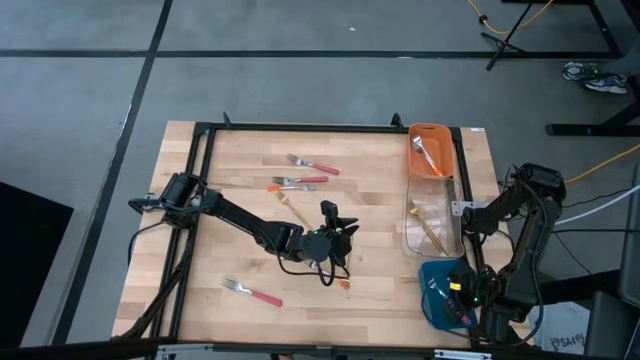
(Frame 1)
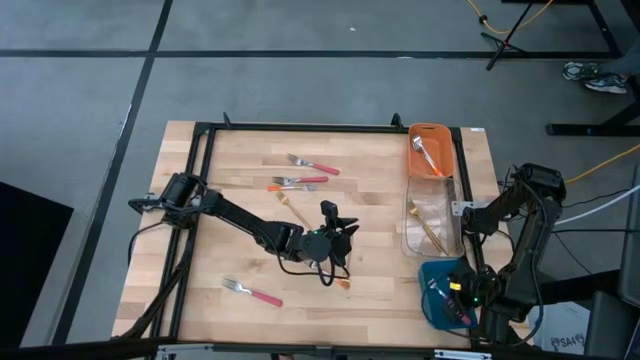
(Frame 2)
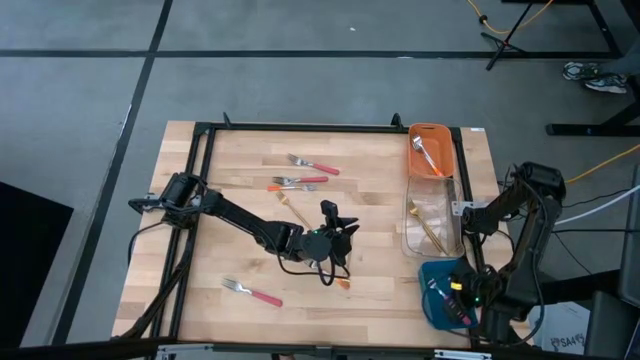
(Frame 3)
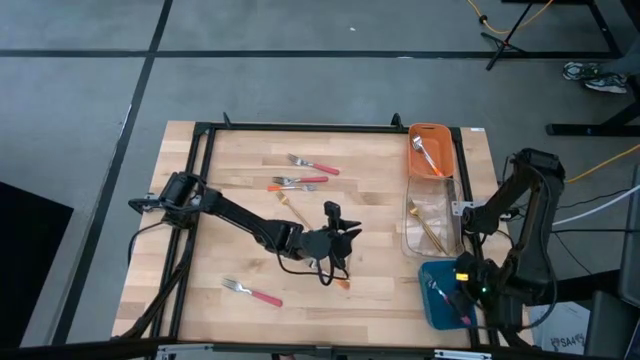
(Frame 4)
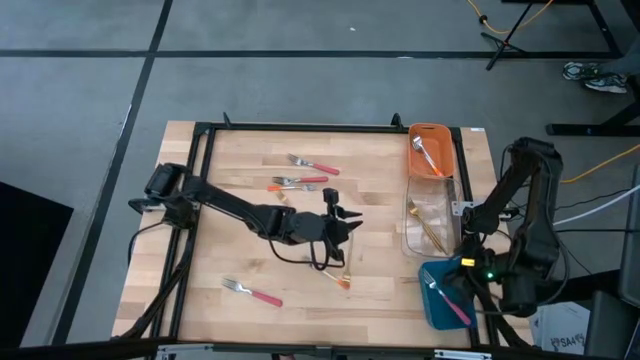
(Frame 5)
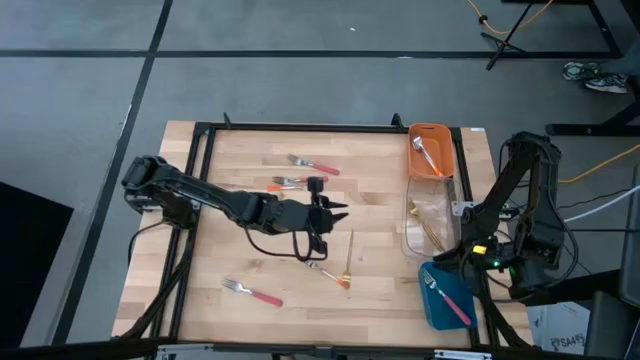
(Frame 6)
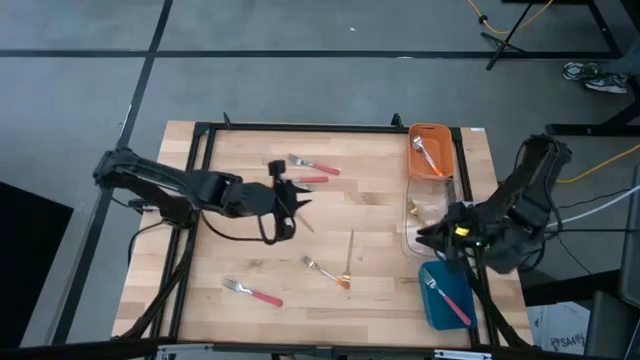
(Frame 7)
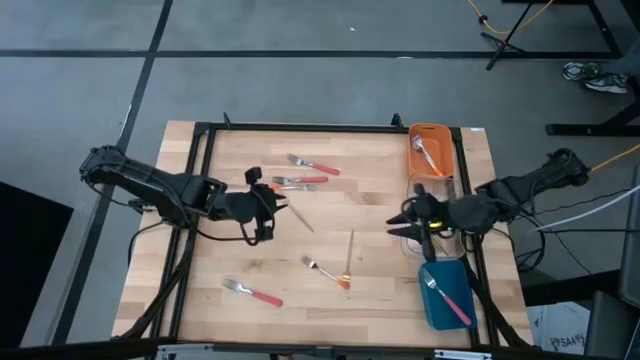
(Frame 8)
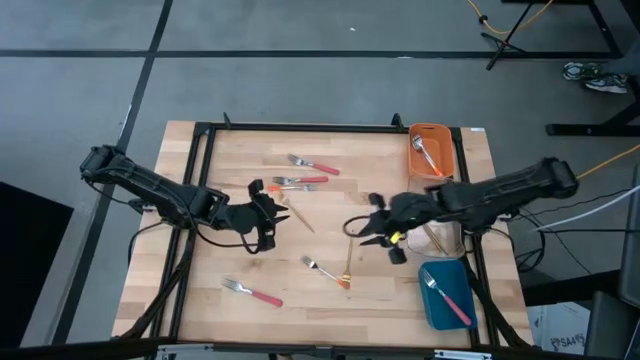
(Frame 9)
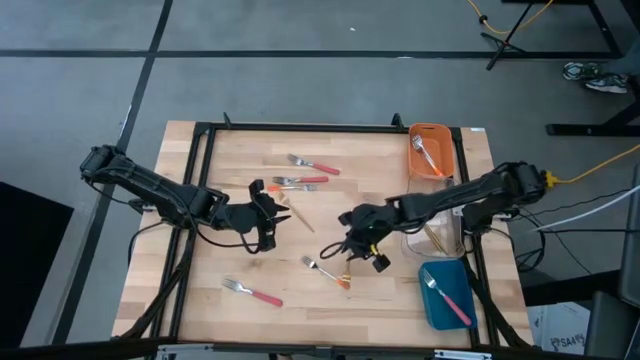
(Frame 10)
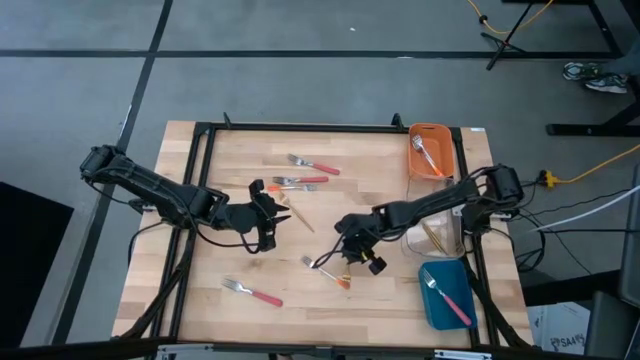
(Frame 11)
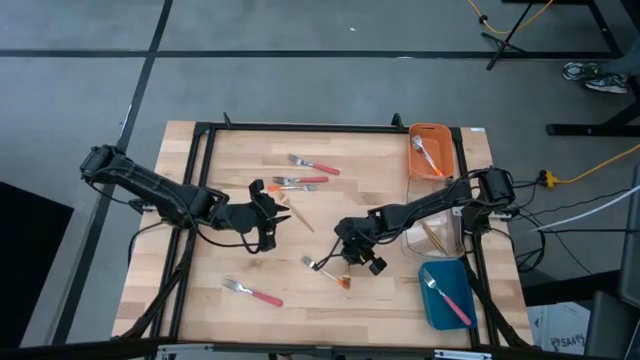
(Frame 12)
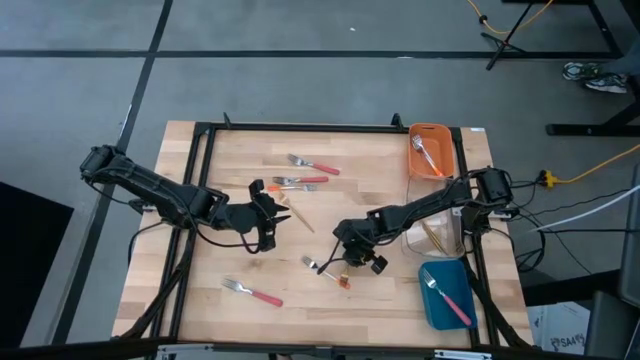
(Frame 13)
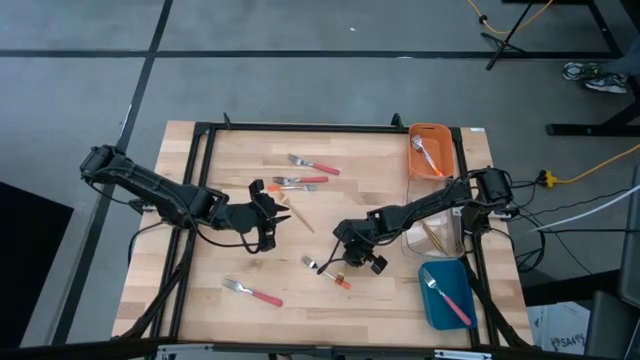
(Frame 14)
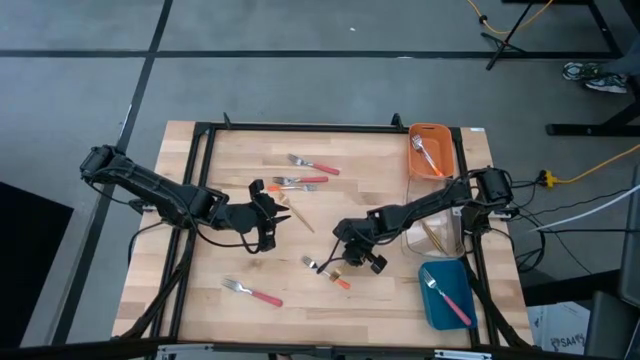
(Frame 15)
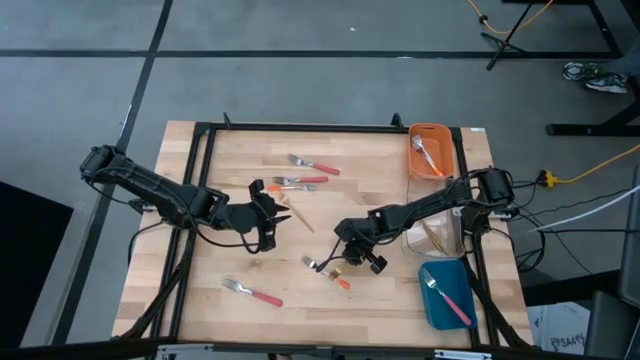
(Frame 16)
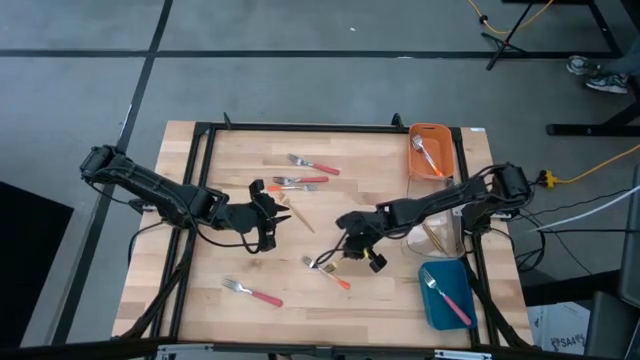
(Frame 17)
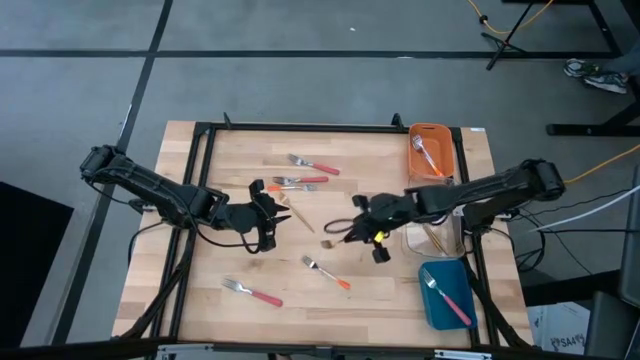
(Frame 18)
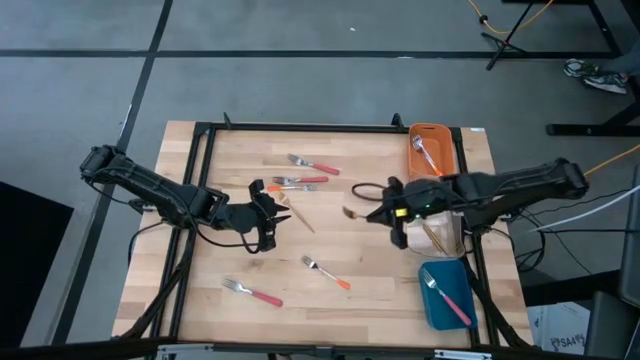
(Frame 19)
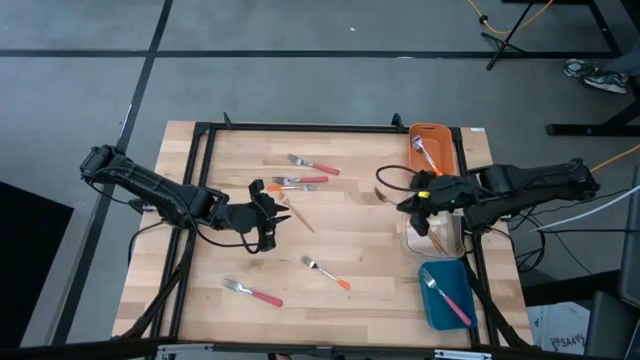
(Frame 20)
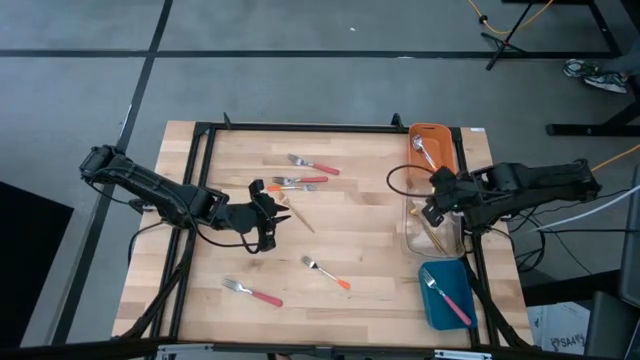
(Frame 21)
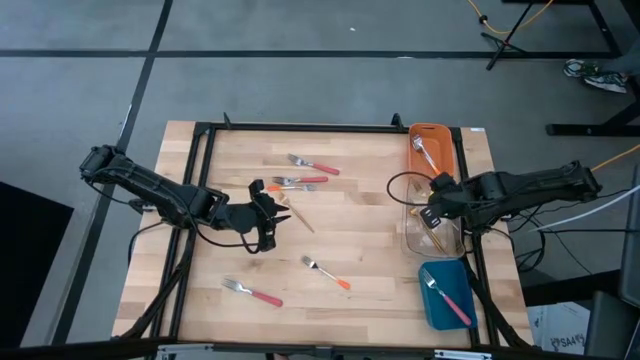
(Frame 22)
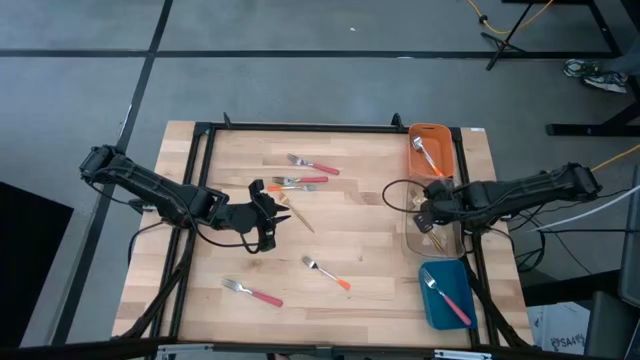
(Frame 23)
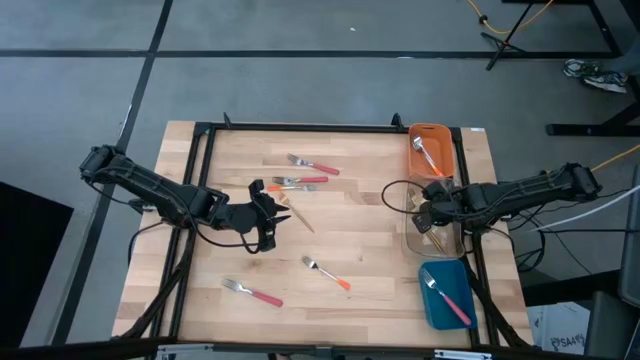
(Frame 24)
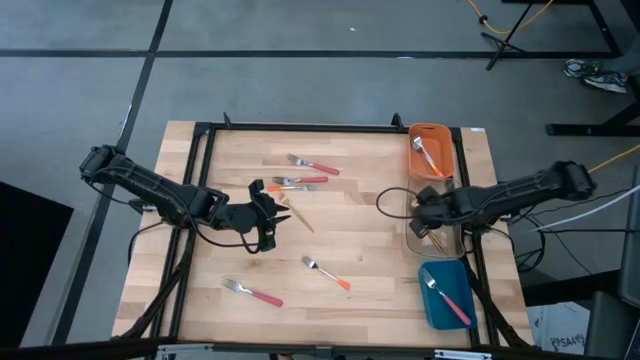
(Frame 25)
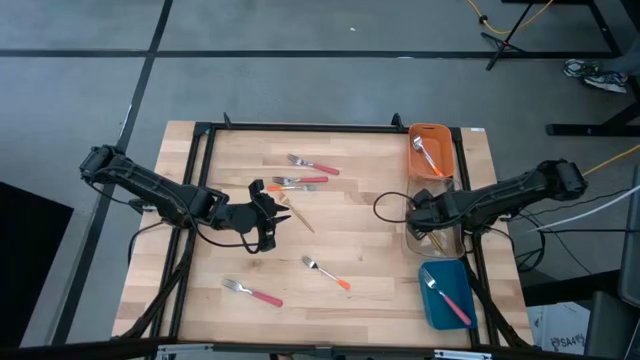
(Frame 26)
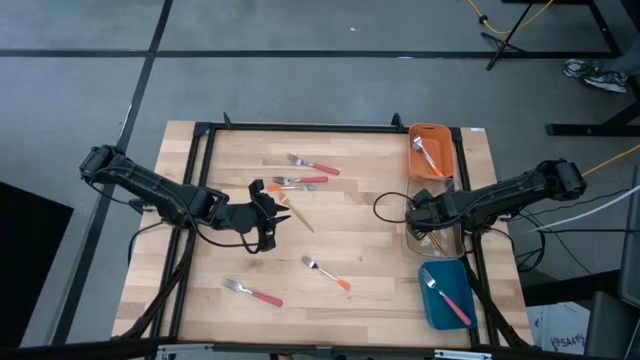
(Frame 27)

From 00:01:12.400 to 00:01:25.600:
Task: Sort silverware by color (type)
Put the gold fork into the transparent bin

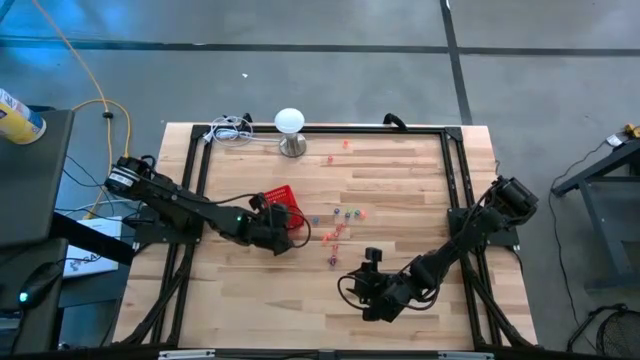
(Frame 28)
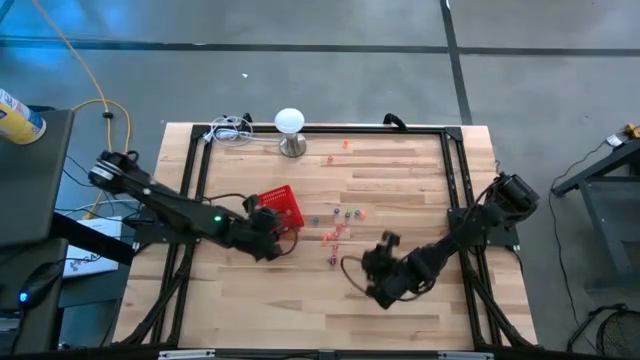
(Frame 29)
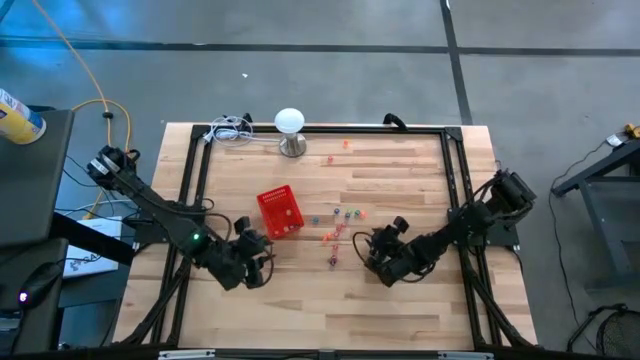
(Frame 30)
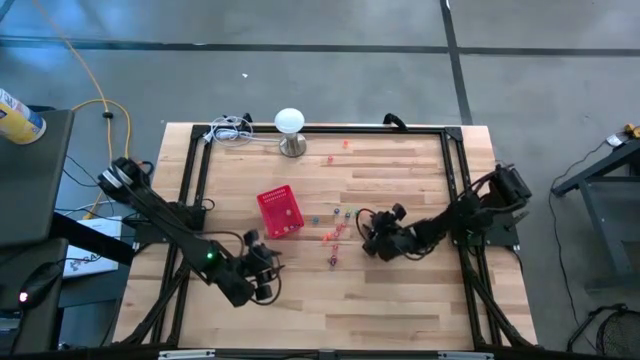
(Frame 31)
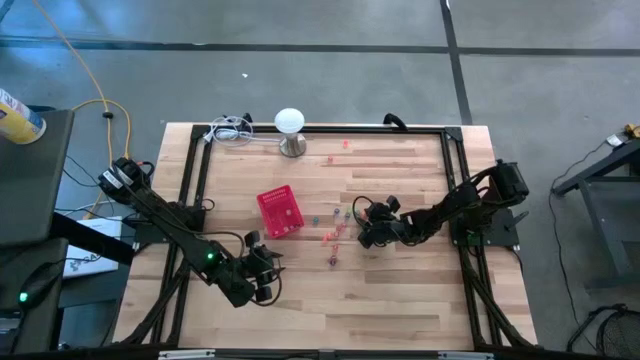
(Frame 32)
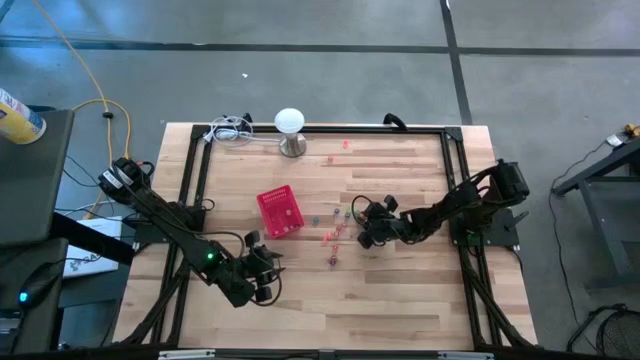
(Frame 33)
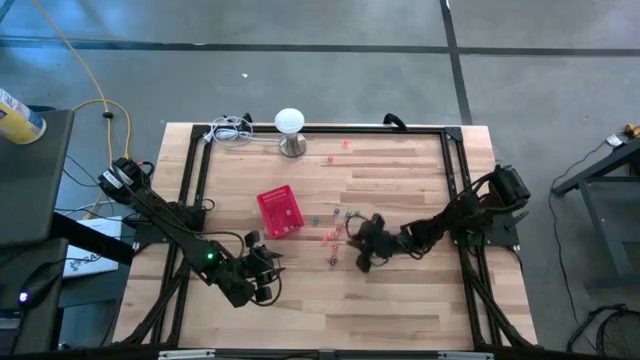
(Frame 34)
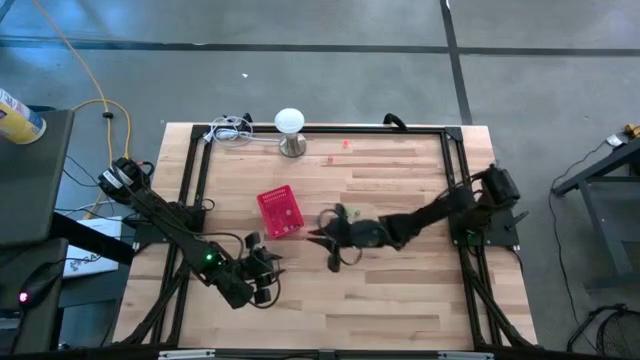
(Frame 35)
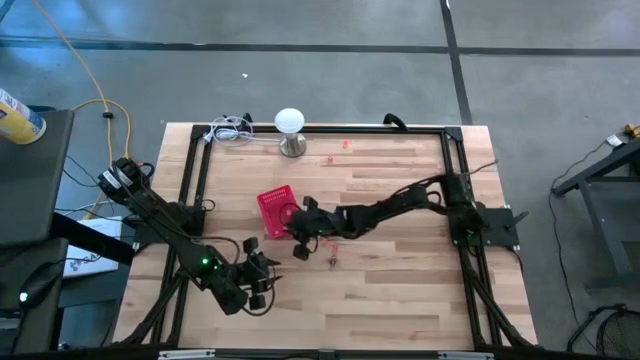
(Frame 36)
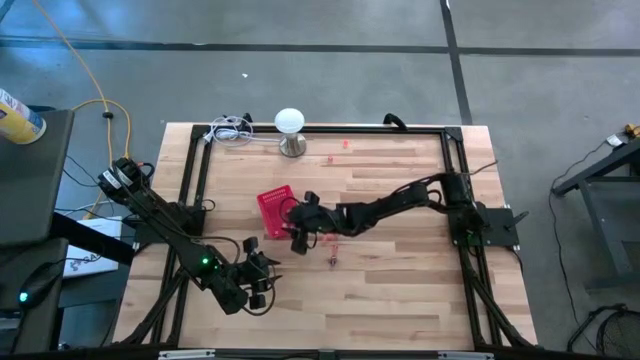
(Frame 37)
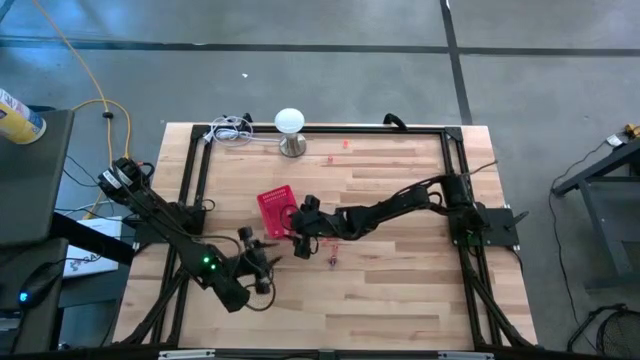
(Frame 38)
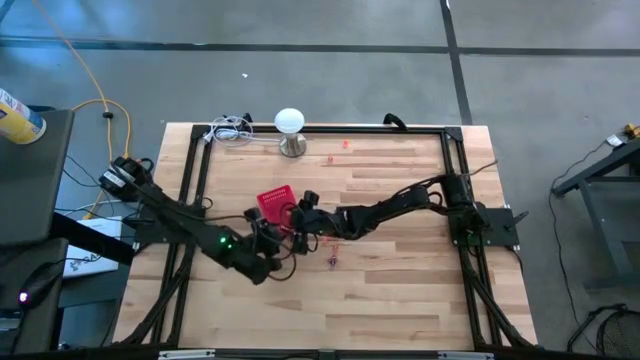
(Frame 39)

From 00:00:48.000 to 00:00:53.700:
Task: Pick & Place Dice
Put the orange die into the red basket
